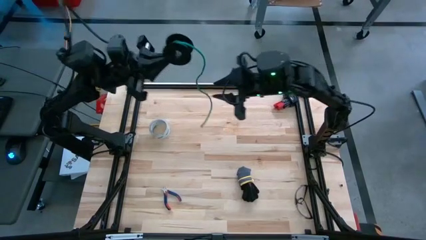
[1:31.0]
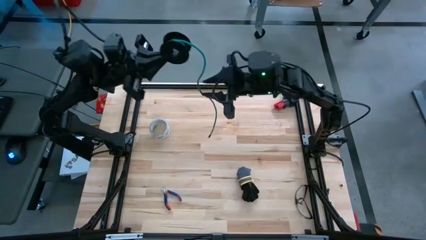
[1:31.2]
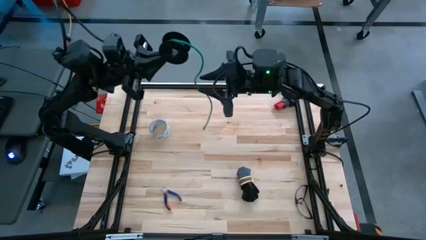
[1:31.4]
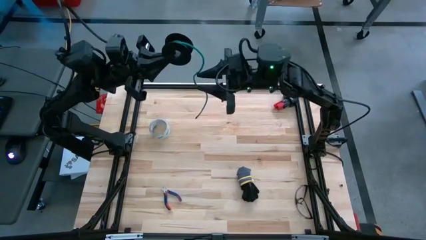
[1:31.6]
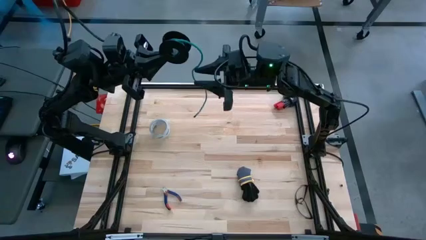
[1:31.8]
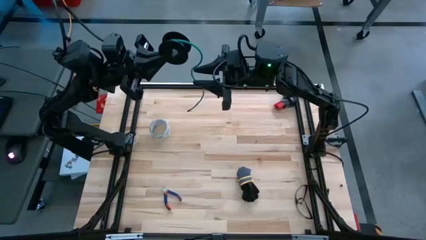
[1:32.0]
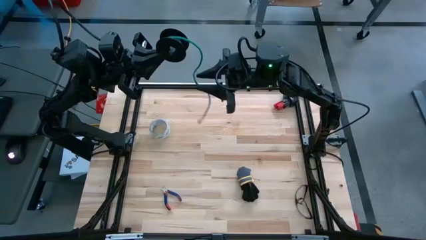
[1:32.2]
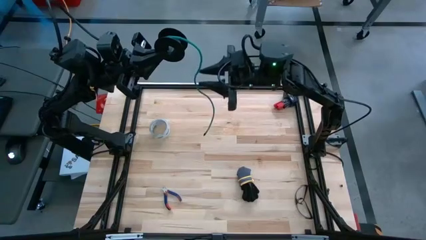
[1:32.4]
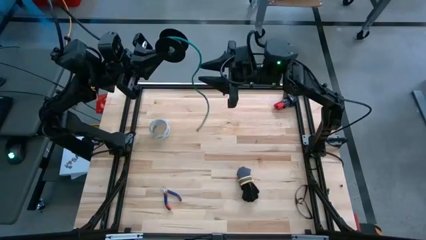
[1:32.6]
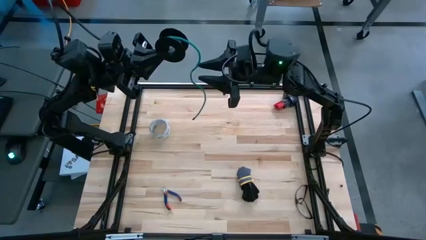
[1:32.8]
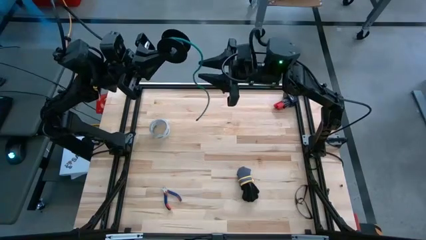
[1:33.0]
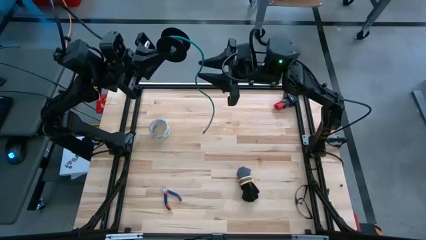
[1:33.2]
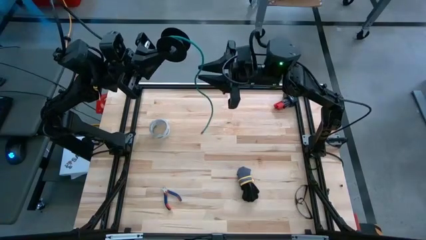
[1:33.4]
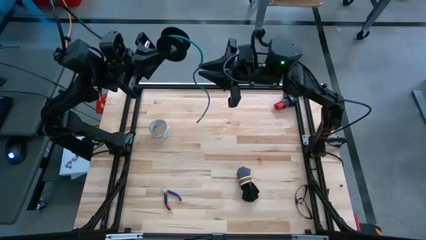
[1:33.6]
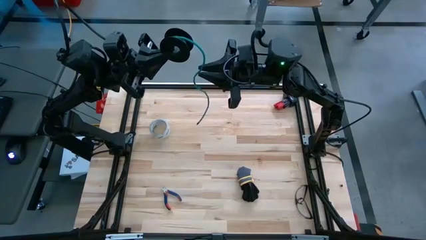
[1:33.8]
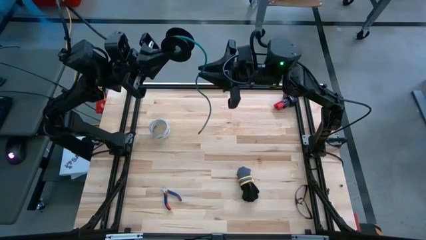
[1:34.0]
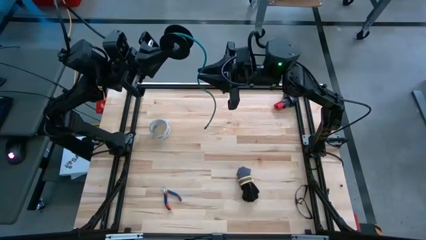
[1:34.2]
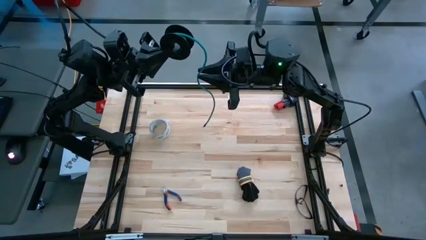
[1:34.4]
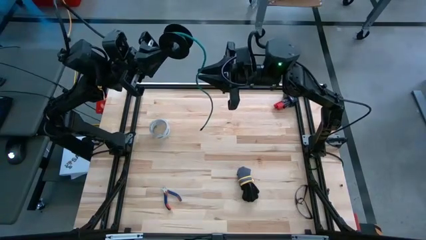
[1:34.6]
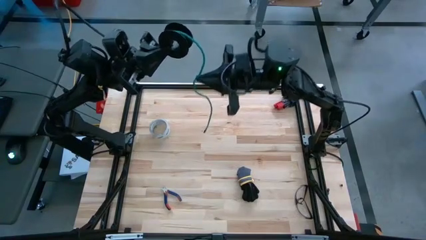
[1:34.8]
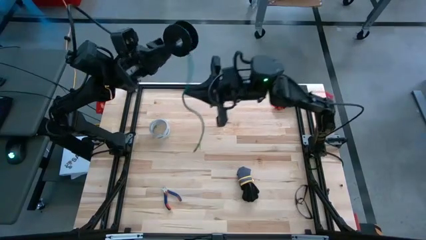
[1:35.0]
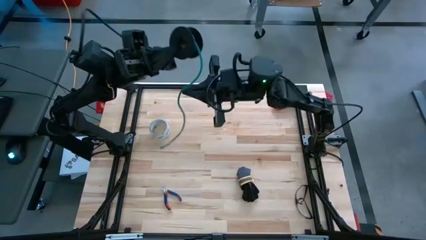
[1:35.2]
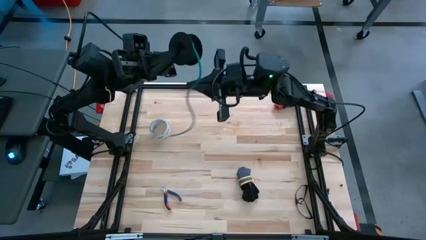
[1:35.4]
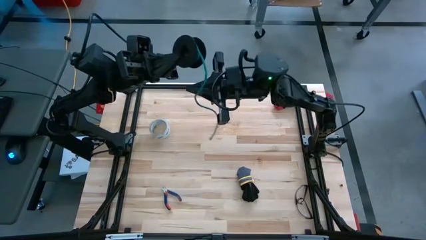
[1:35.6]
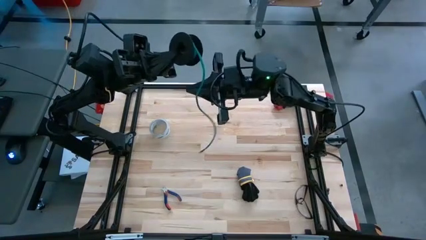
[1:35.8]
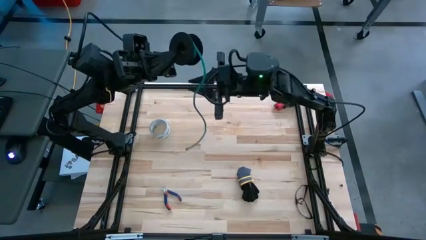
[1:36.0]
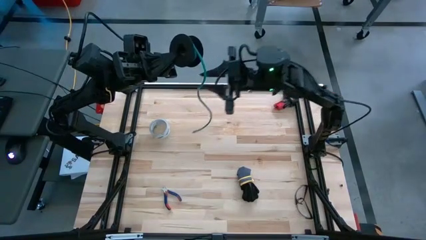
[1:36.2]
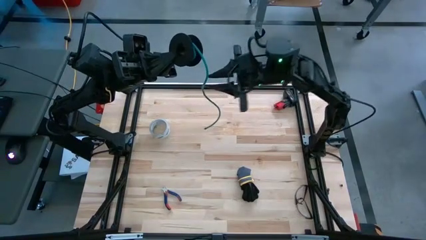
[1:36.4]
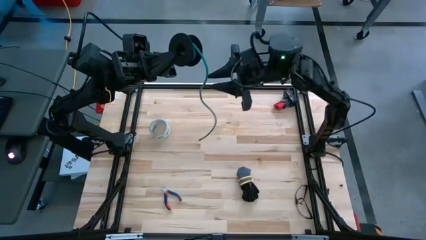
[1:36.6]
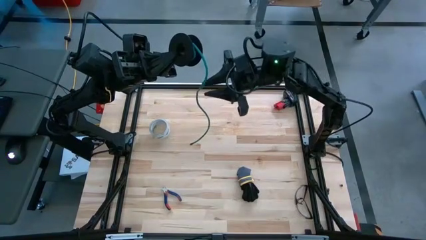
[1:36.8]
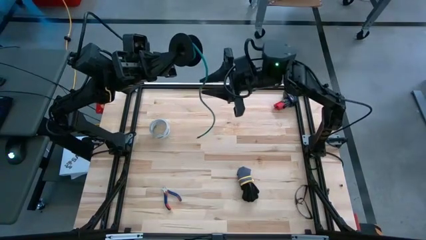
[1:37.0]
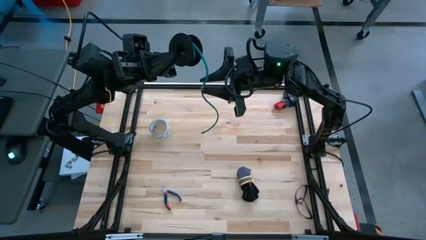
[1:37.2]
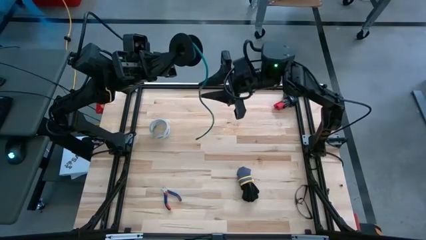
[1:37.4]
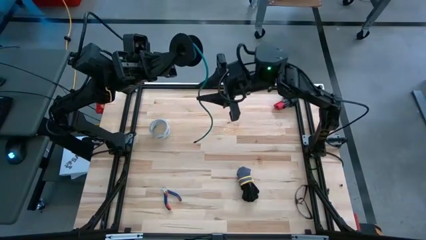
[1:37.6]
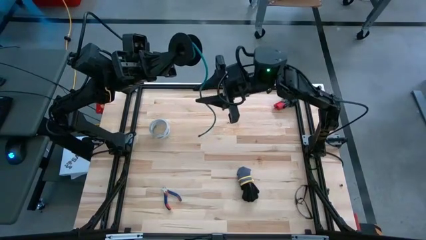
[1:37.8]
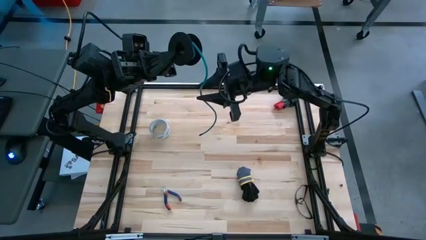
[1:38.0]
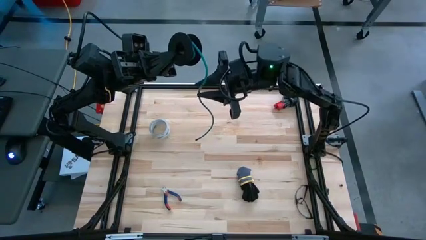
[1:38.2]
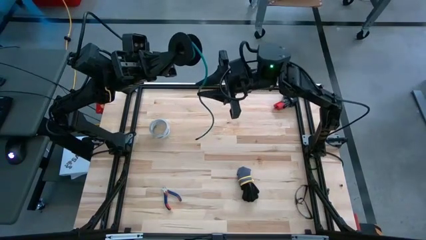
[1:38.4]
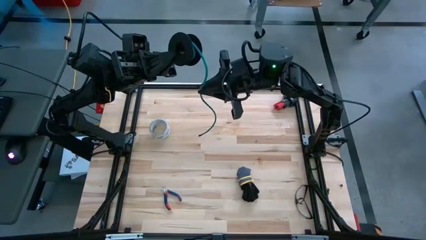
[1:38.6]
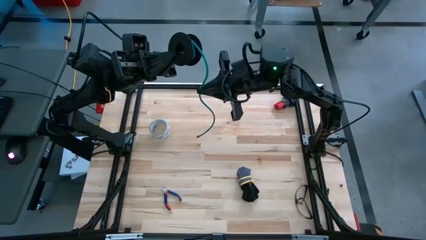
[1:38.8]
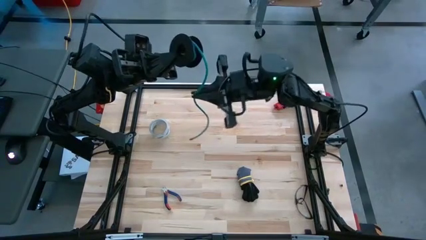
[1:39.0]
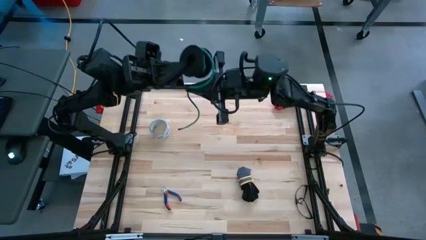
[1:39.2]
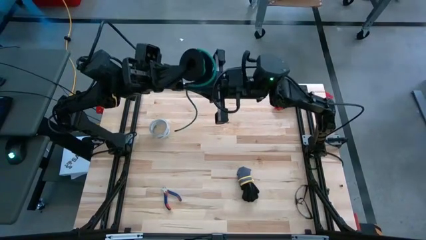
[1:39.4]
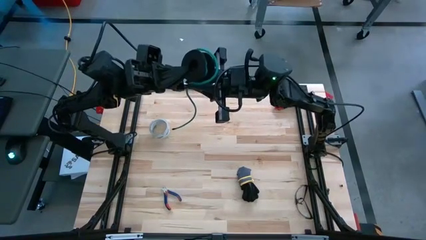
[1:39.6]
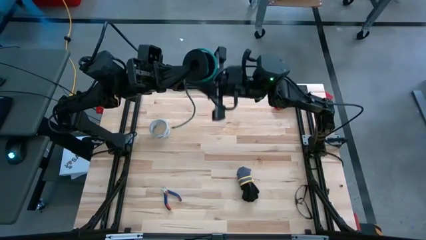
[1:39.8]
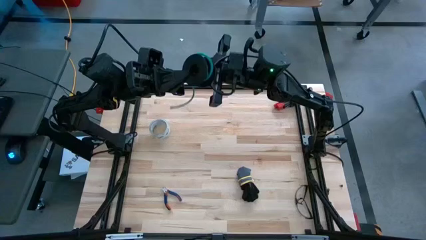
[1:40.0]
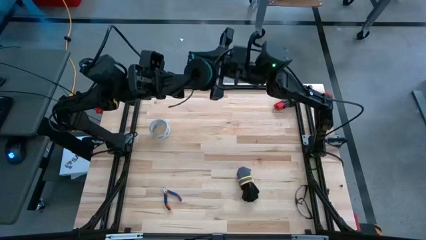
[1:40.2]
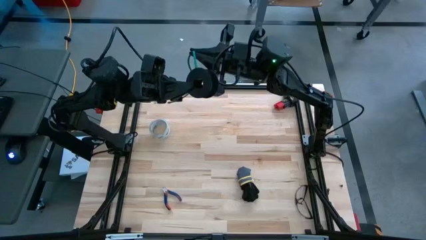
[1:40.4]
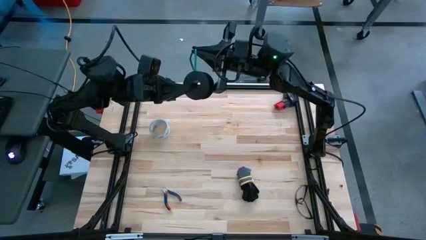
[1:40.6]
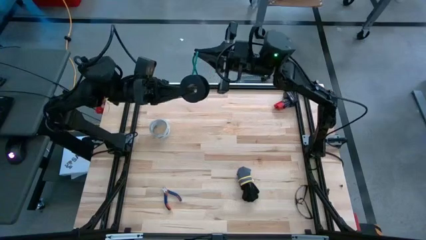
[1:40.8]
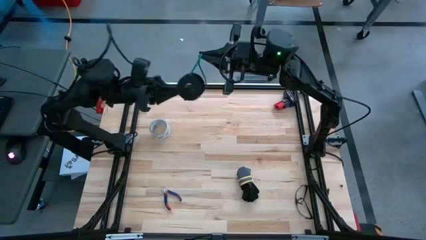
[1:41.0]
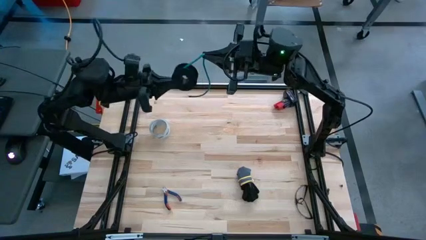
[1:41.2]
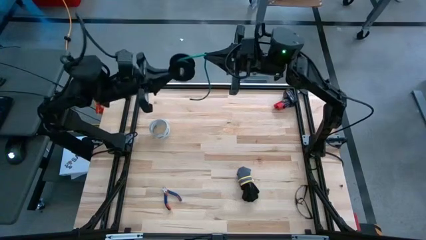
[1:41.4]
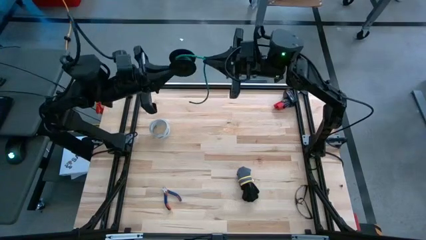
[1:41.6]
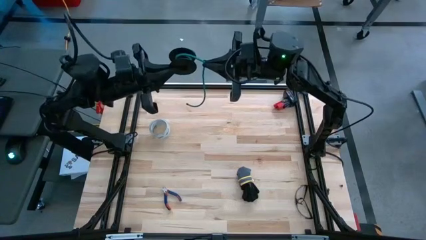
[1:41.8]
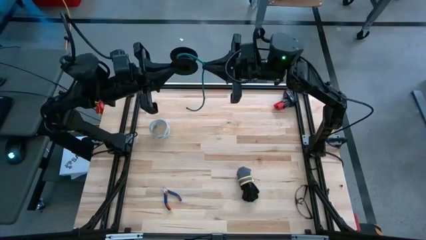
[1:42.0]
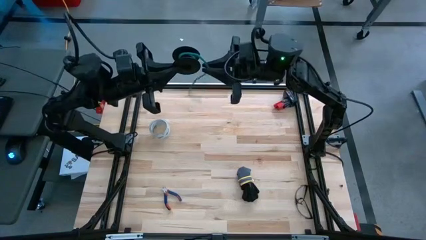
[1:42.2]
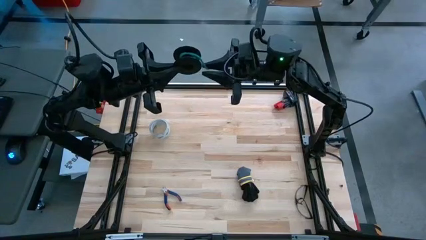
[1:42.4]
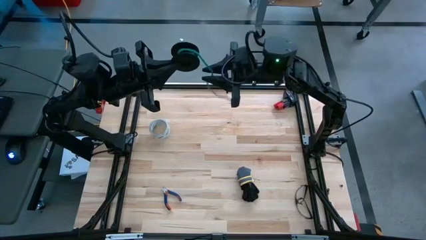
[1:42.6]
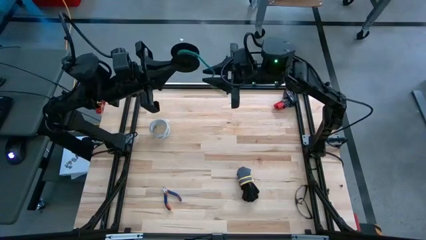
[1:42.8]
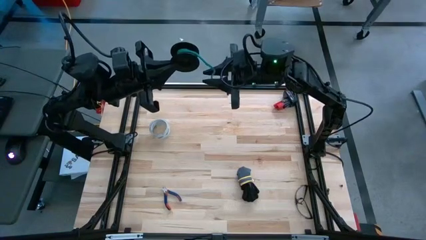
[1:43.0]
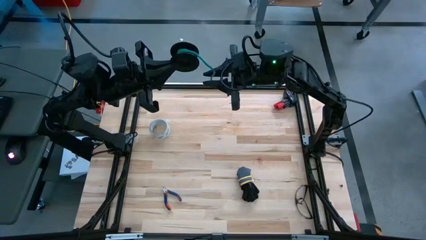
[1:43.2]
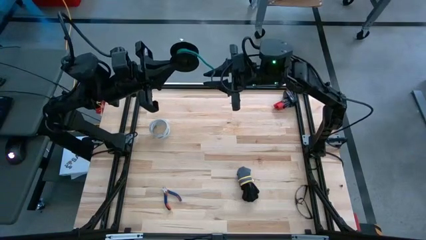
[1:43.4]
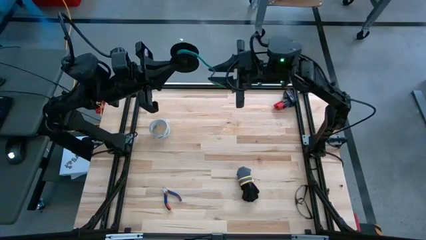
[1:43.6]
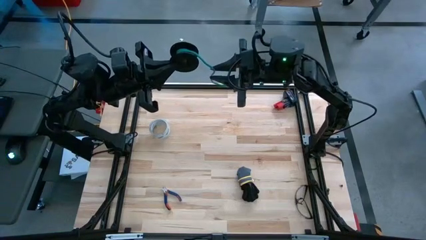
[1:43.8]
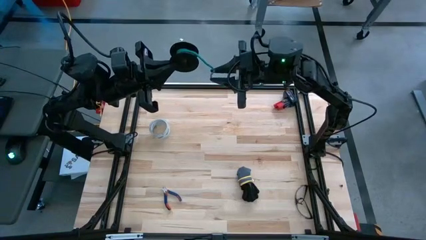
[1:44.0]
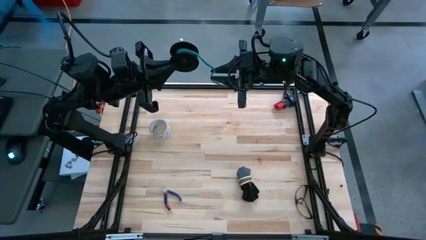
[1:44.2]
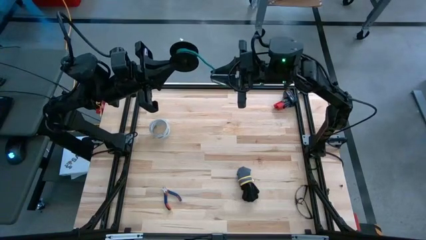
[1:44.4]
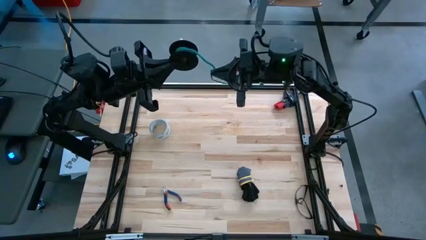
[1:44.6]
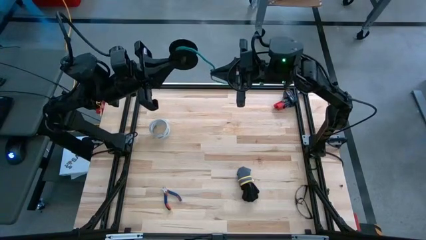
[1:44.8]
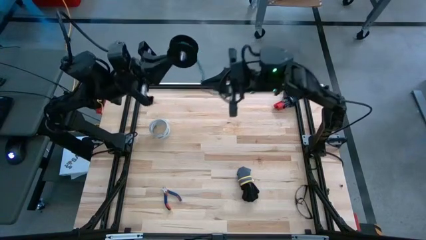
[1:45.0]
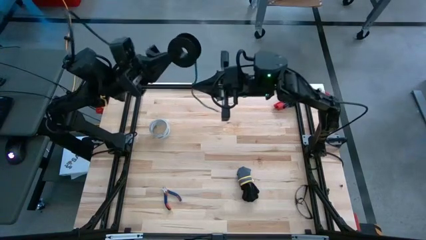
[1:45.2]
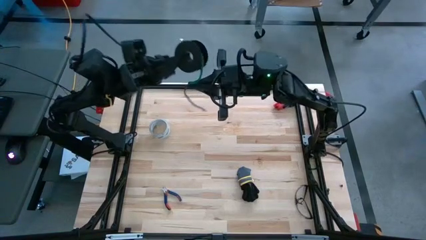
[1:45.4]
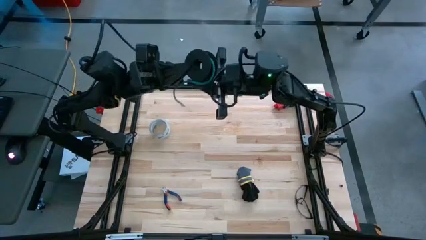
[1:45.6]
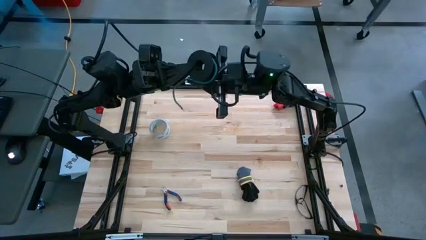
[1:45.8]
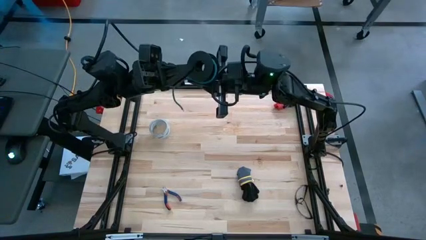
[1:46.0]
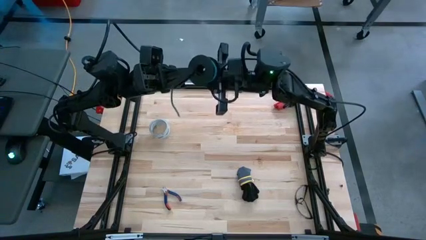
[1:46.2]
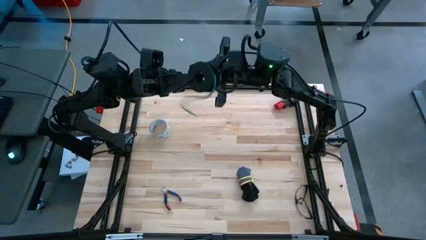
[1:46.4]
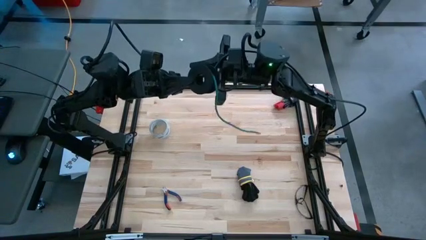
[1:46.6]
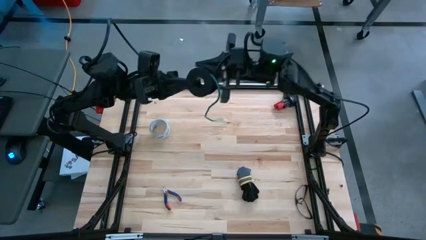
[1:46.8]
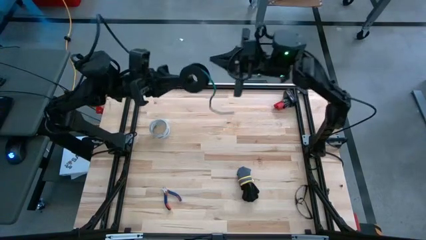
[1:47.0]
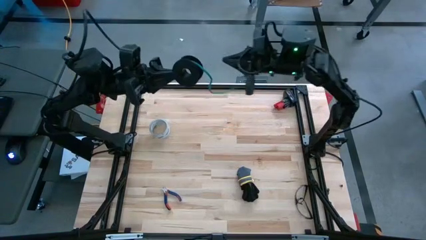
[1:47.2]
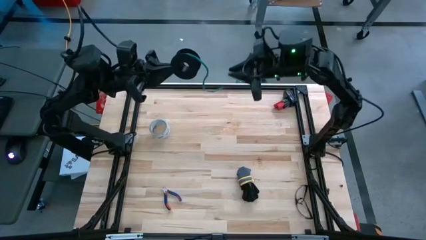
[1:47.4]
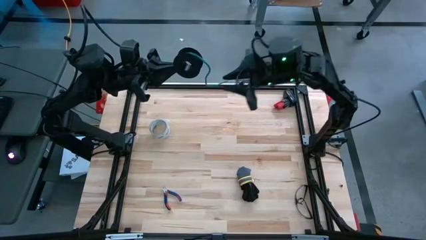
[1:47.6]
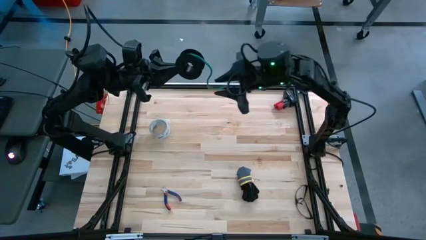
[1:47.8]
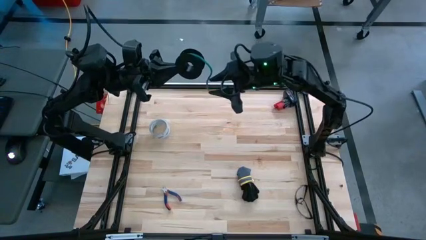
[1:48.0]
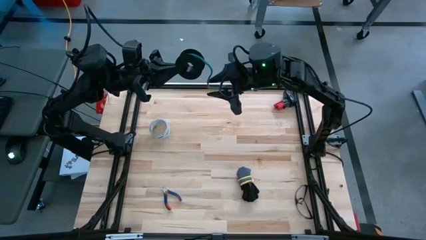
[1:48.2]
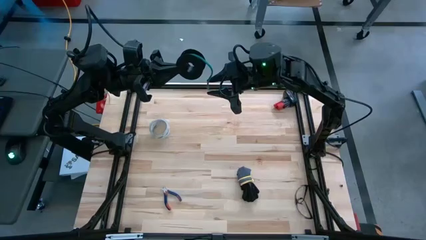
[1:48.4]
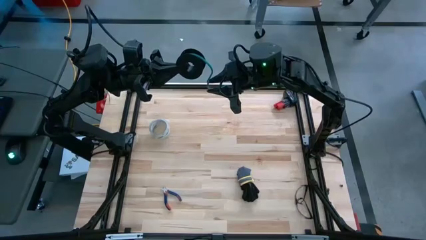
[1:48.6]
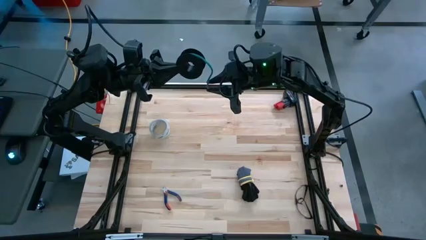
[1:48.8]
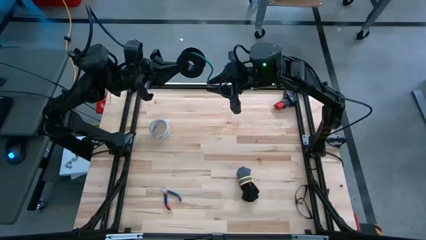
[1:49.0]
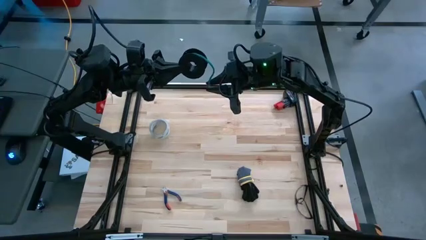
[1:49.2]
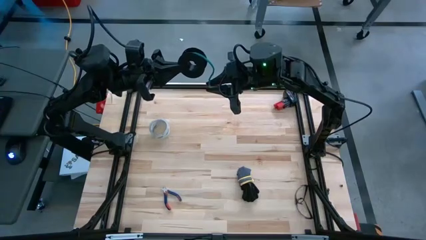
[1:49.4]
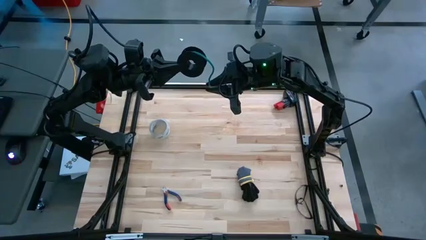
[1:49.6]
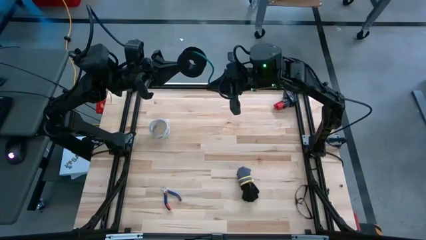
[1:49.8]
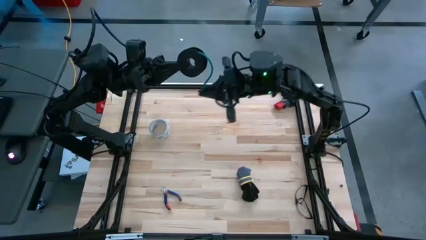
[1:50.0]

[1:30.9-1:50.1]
Task: Coil cords
Coil the green wire on the spool
